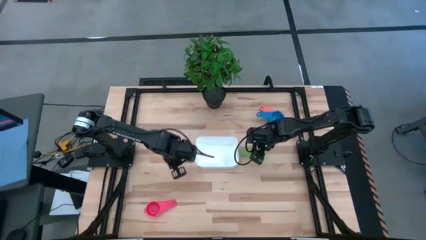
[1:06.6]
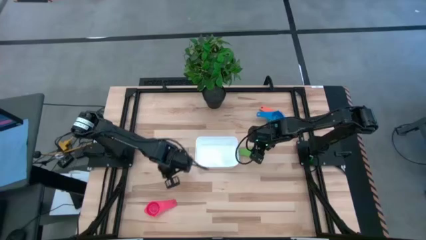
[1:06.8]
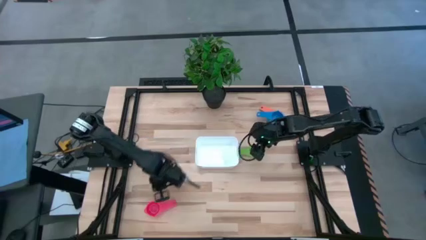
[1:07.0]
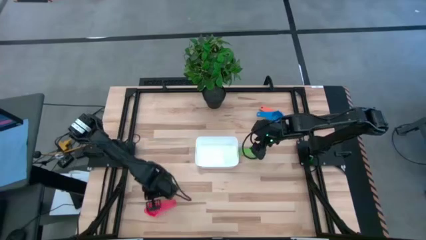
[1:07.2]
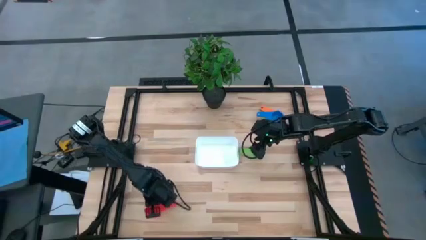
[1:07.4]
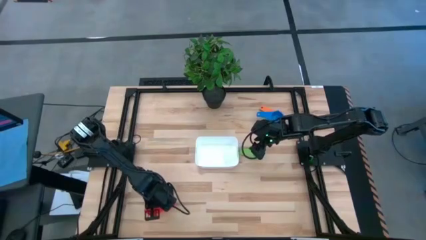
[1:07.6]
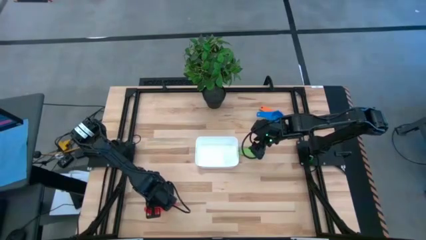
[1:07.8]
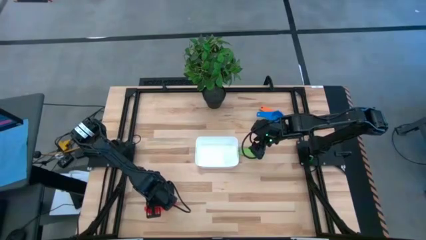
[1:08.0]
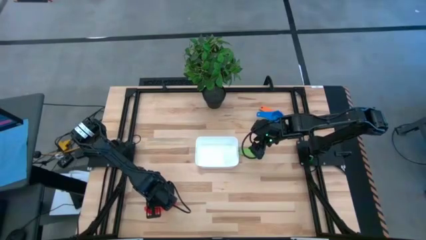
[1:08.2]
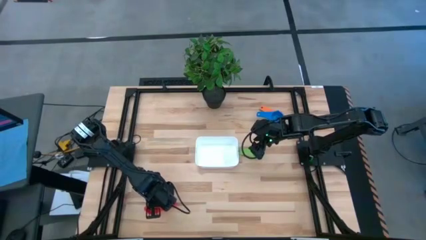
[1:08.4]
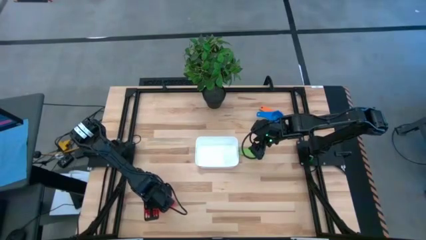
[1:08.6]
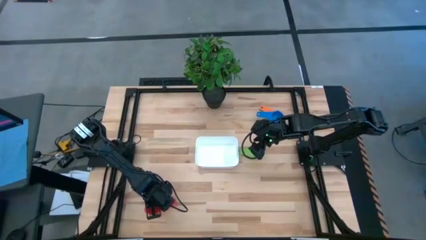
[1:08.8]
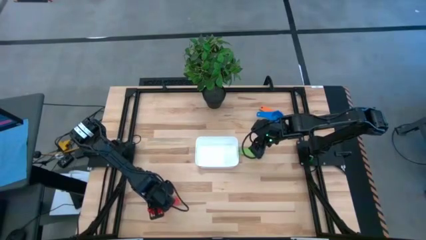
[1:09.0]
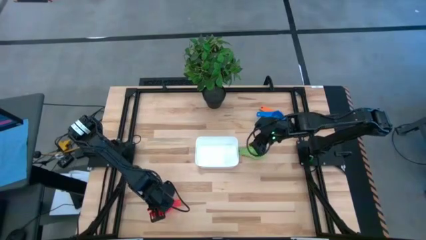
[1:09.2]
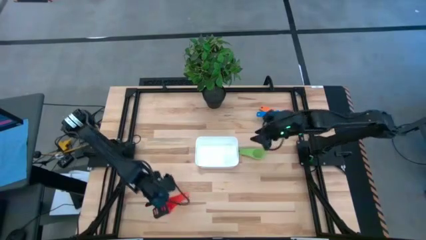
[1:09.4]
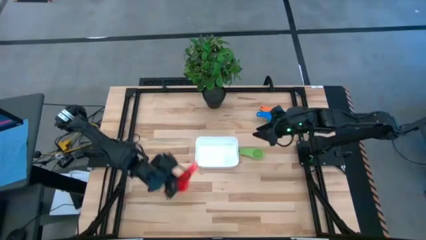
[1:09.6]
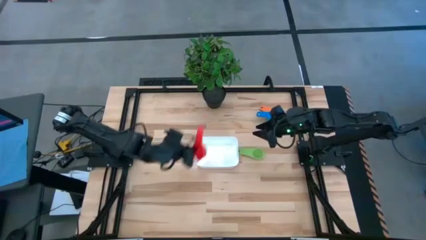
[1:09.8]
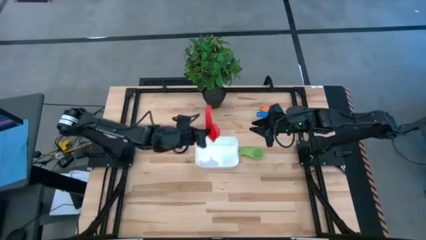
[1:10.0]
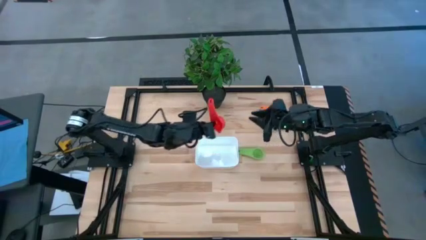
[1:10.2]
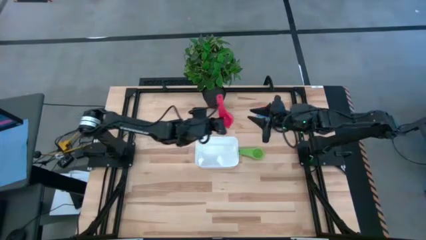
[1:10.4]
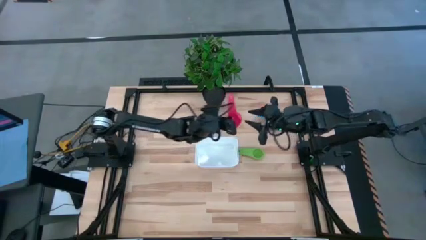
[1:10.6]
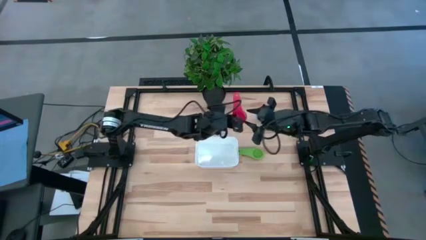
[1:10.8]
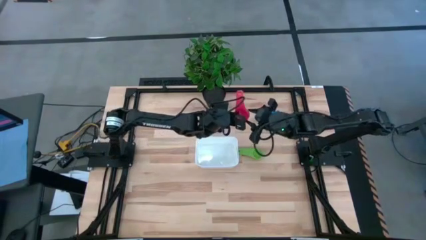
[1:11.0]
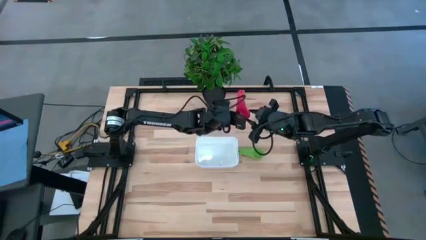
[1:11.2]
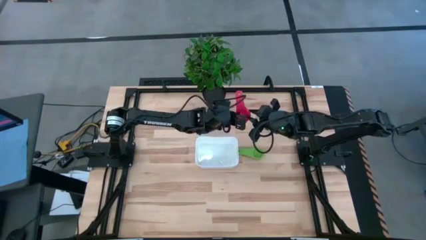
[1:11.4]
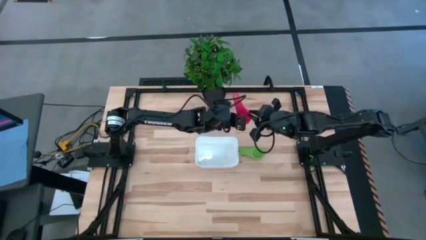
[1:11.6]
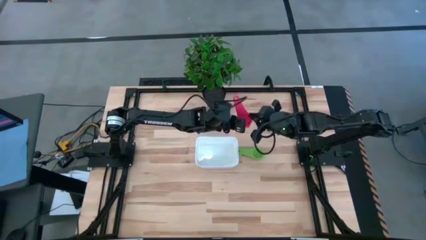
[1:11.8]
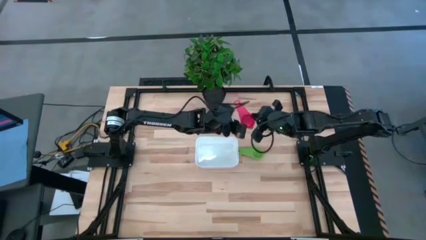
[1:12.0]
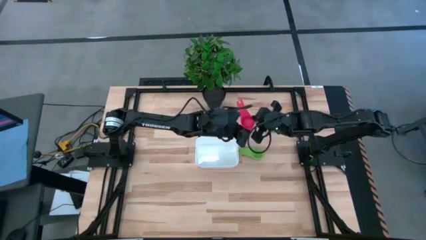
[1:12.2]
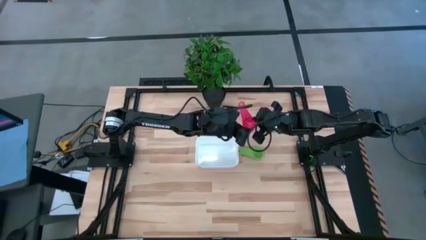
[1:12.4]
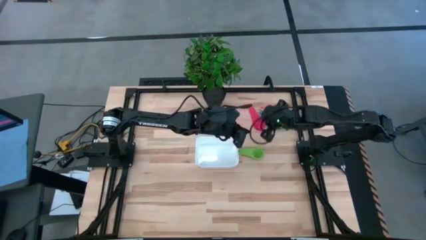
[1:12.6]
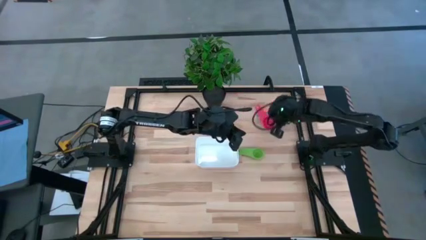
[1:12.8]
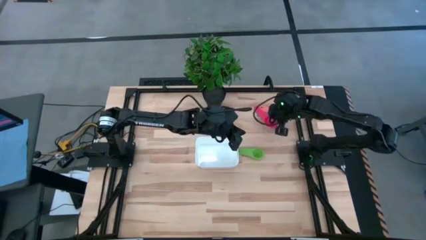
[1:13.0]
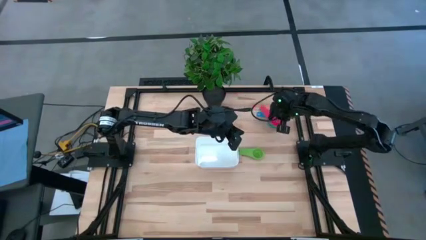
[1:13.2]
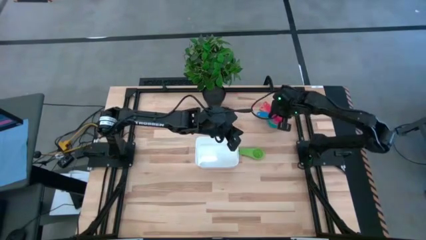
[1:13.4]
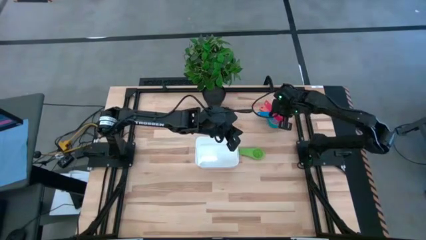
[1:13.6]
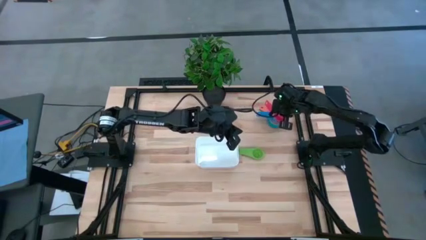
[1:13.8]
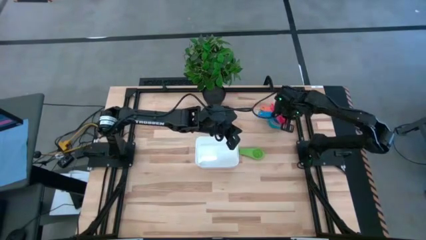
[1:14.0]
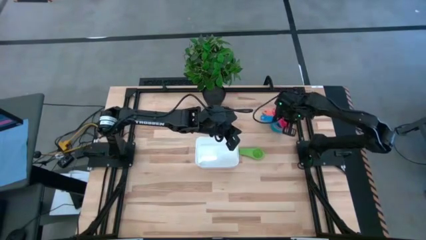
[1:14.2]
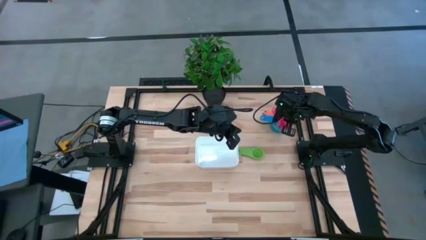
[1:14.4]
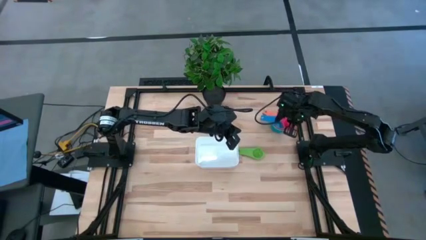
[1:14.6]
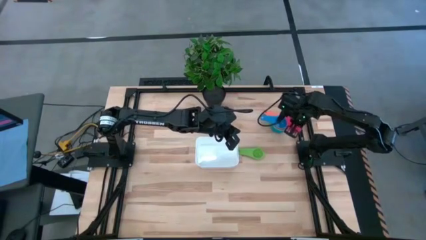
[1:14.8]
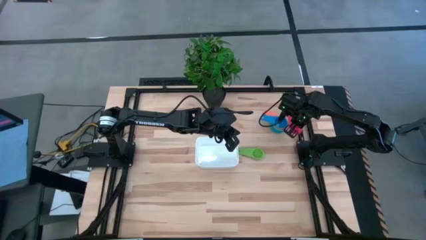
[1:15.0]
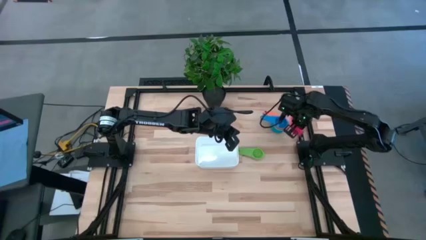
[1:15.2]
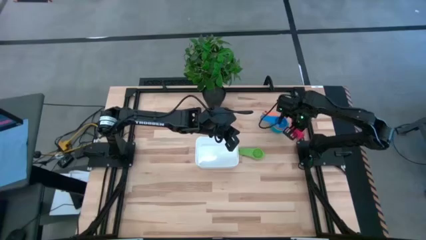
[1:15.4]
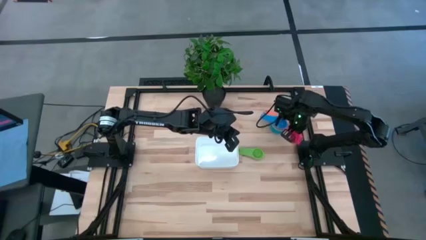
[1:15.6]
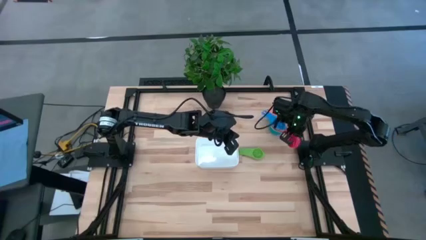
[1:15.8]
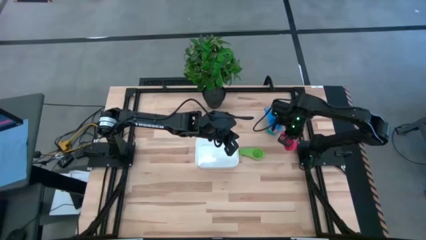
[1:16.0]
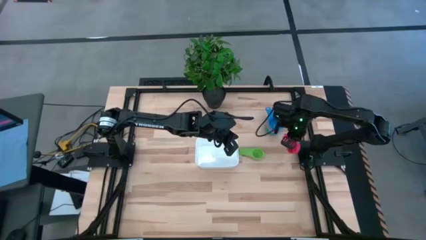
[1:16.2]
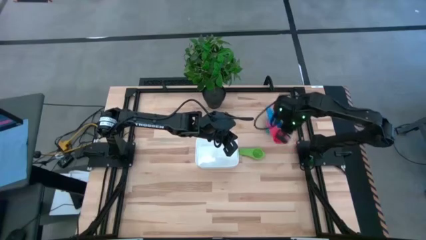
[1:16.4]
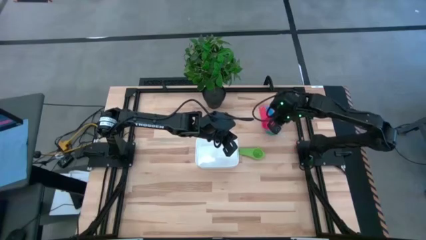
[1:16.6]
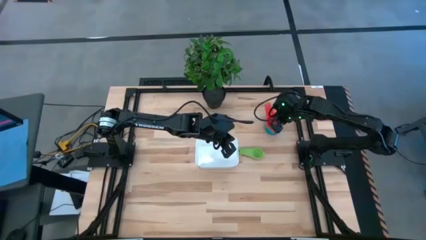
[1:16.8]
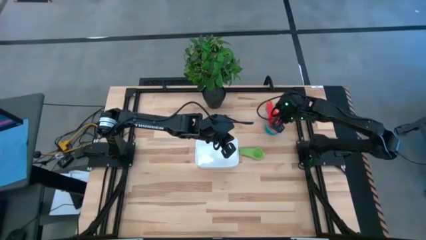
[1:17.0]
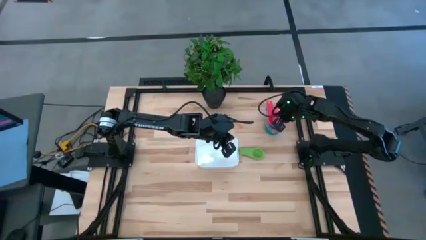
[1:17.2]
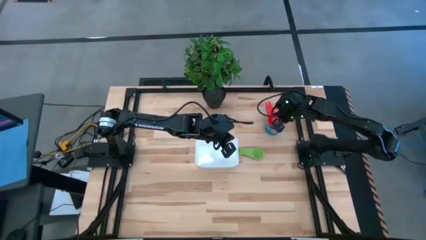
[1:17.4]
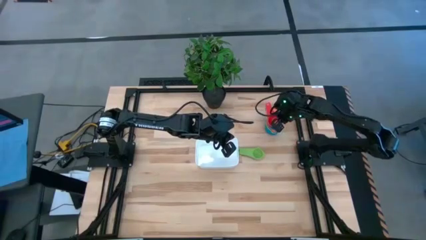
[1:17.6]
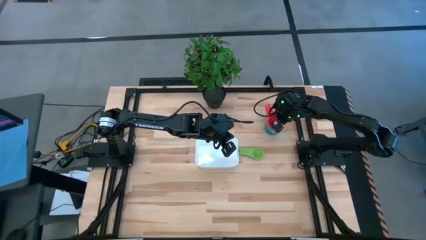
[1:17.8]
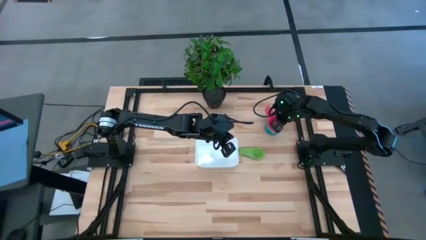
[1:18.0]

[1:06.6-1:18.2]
Task: Nest measuring cups in basket
Stack the red measuring cup on top of the blue measuring cup

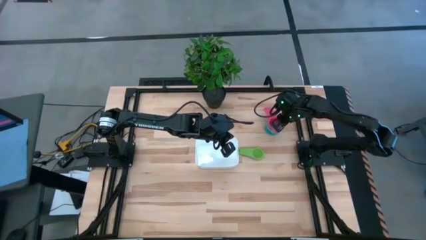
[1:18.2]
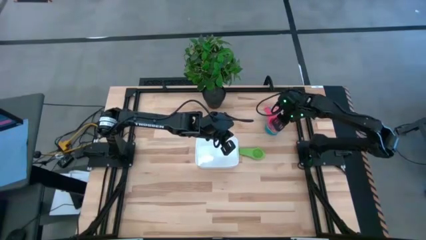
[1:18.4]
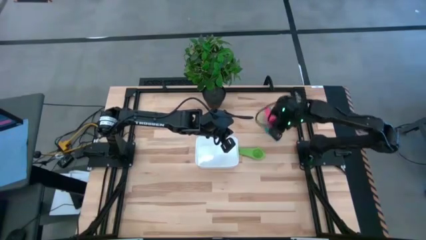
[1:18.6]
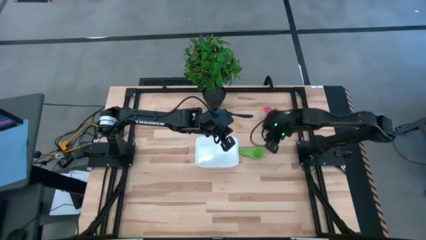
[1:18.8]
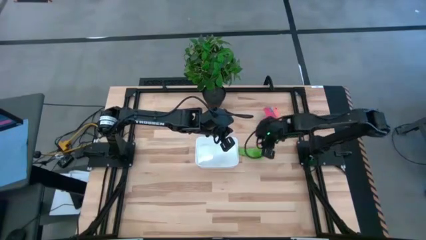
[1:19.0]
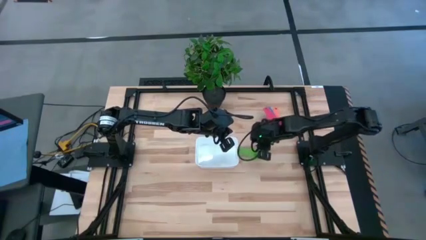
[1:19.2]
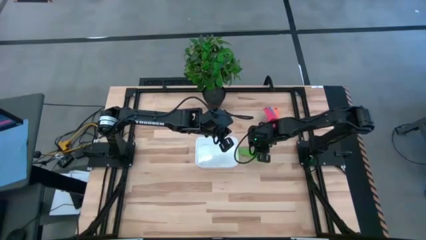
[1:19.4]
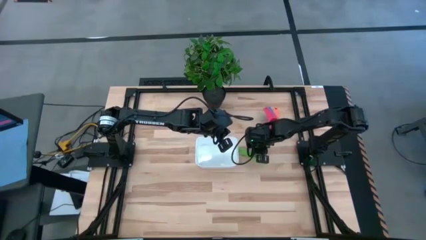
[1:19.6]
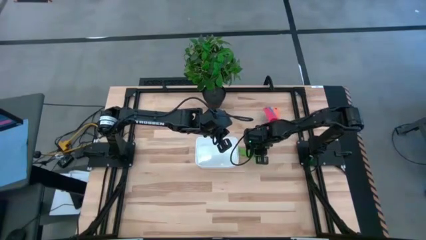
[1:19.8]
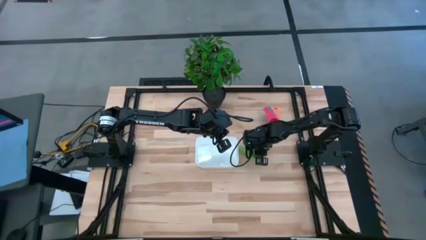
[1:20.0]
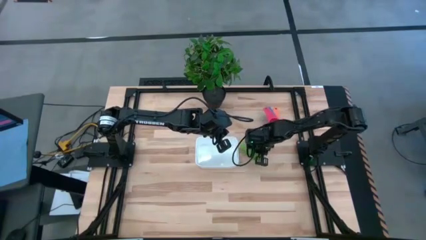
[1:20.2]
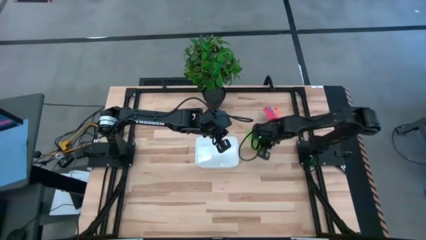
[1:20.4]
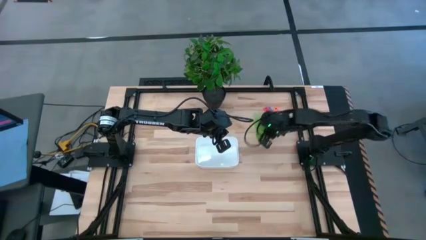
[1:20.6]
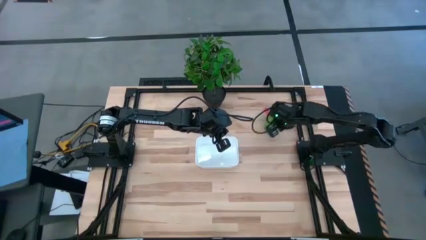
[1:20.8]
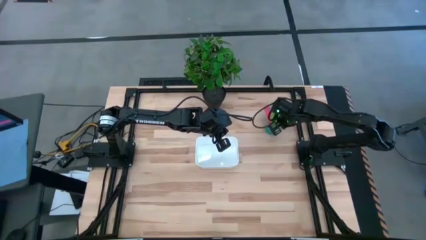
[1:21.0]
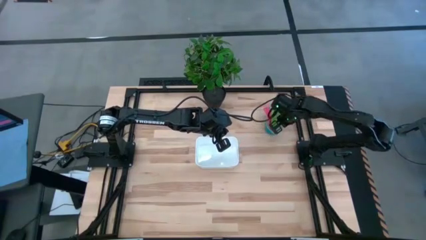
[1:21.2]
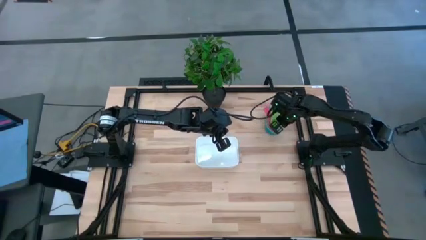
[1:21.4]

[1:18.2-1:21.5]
Stack the green measuring cup on top of the red measuring cup

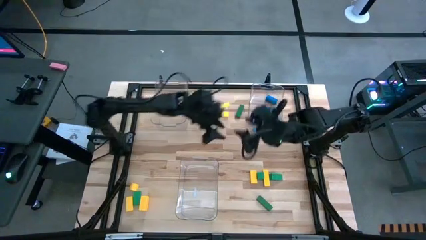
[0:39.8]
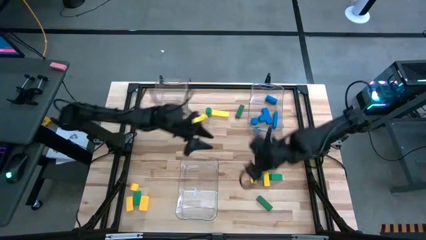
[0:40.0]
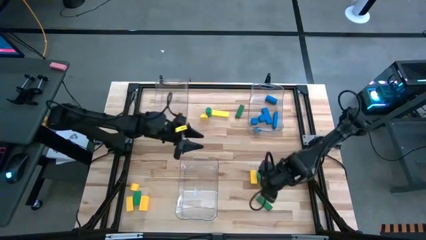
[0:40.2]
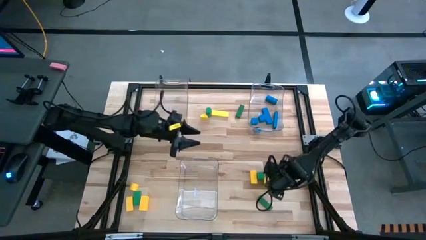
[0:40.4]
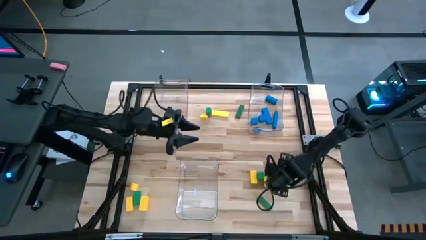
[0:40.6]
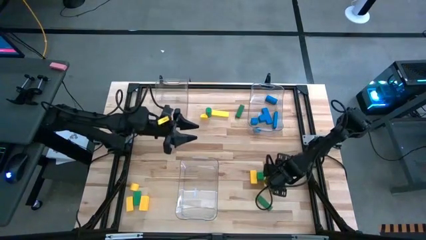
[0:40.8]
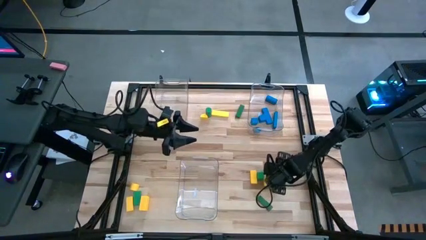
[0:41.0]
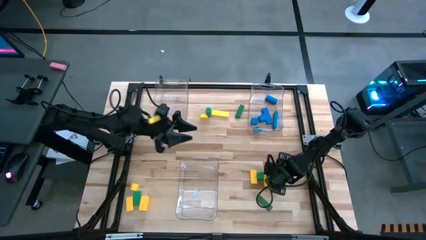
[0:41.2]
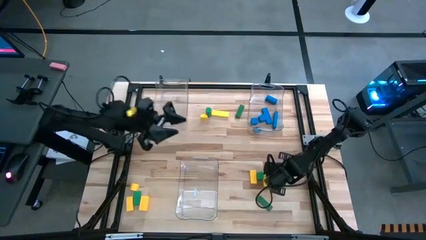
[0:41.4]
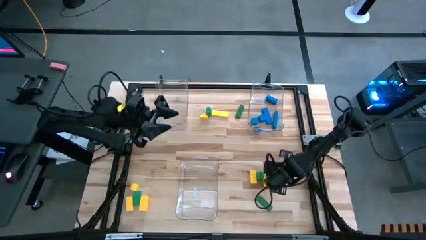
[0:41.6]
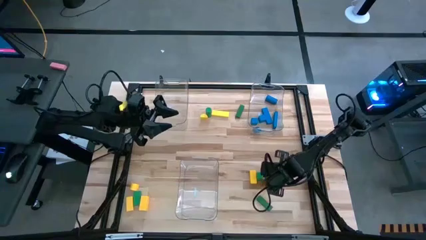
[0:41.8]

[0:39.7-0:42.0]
Task: Sort blocks
Put the green block into the bottom transparent bin
